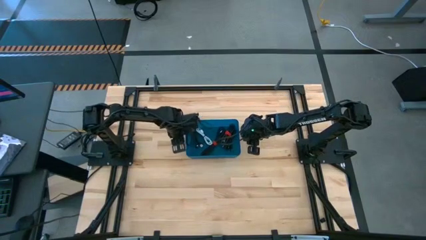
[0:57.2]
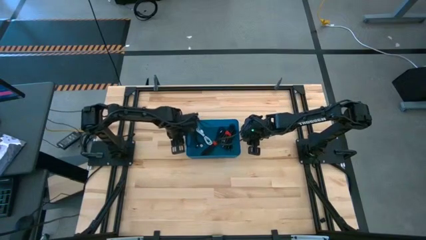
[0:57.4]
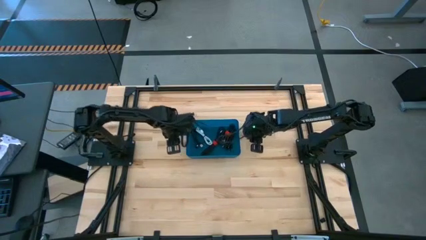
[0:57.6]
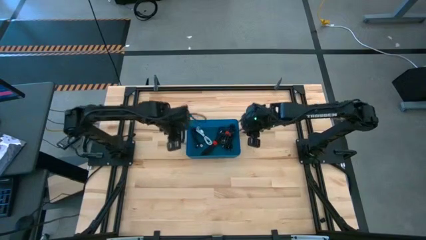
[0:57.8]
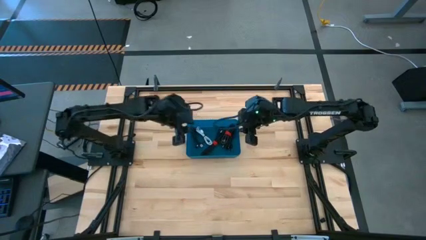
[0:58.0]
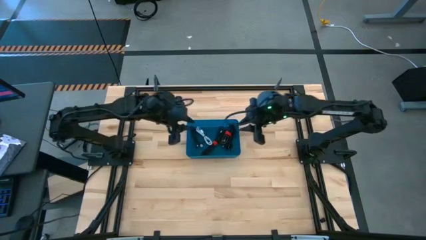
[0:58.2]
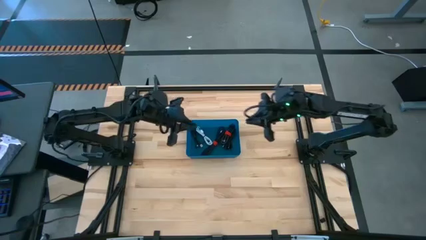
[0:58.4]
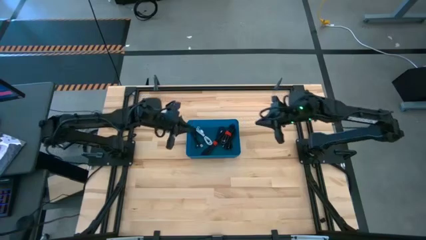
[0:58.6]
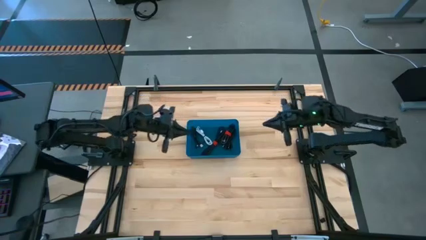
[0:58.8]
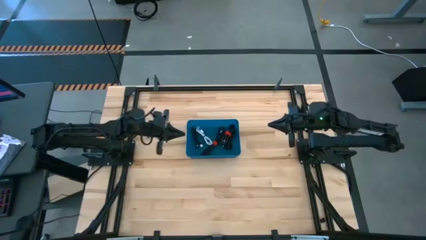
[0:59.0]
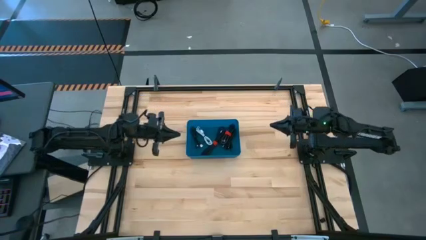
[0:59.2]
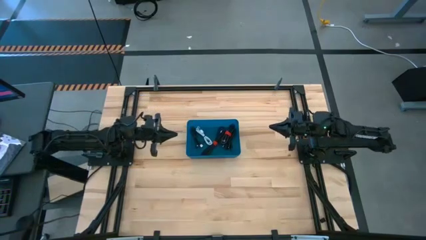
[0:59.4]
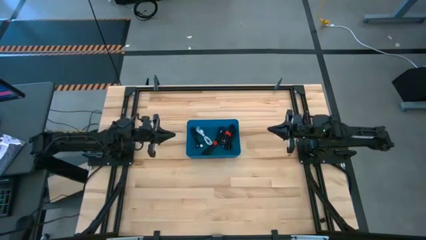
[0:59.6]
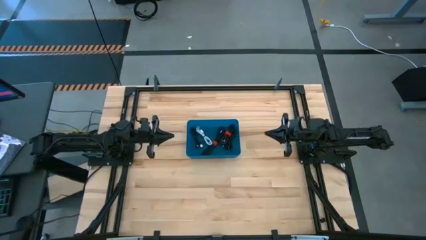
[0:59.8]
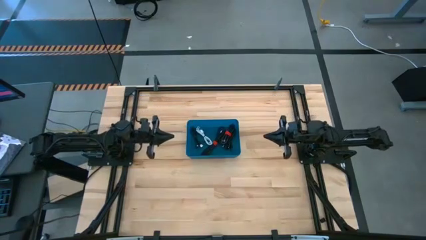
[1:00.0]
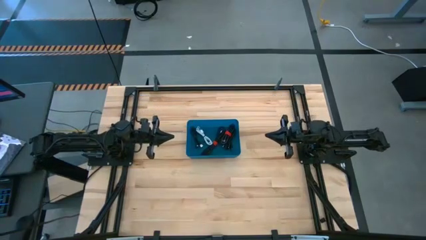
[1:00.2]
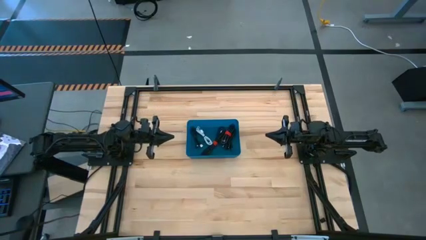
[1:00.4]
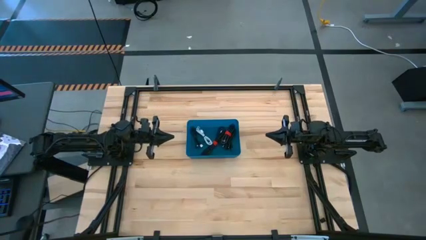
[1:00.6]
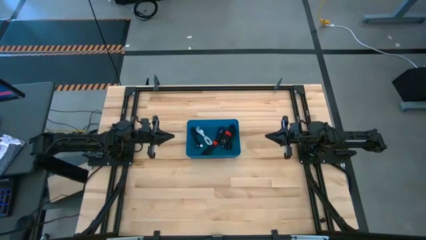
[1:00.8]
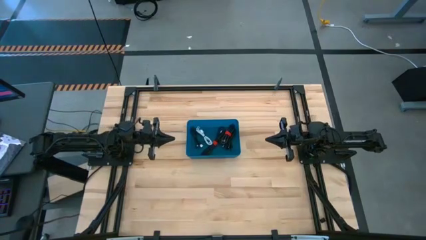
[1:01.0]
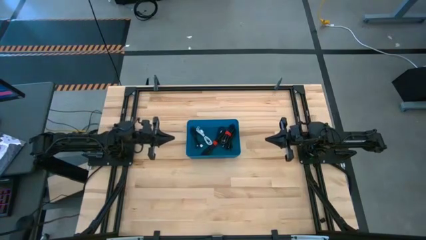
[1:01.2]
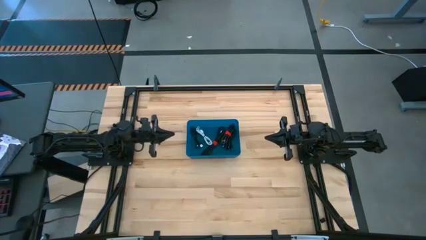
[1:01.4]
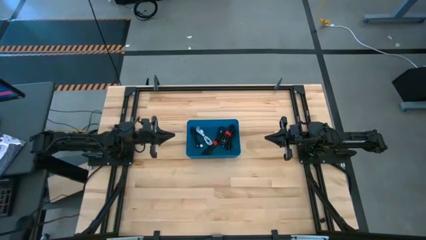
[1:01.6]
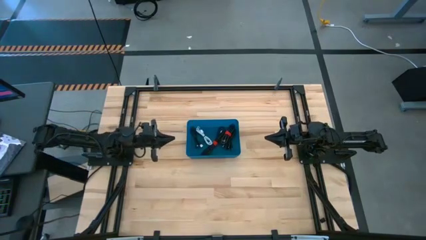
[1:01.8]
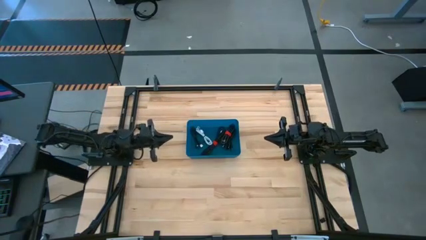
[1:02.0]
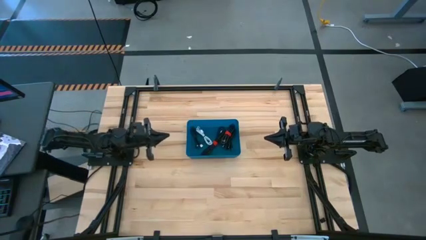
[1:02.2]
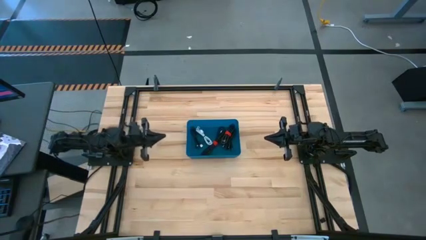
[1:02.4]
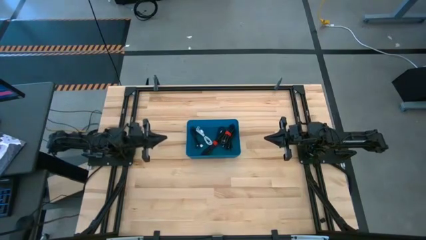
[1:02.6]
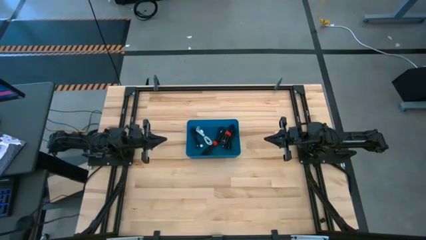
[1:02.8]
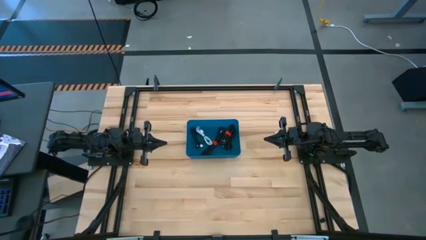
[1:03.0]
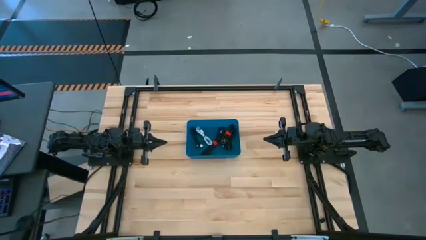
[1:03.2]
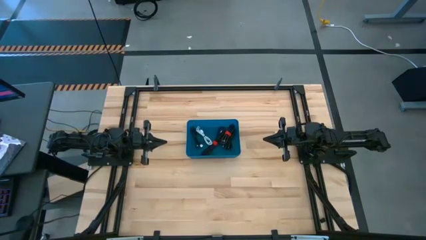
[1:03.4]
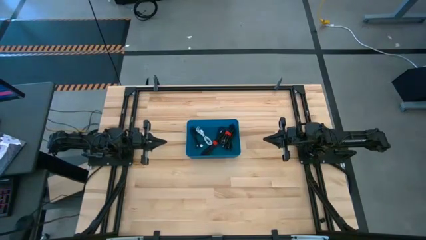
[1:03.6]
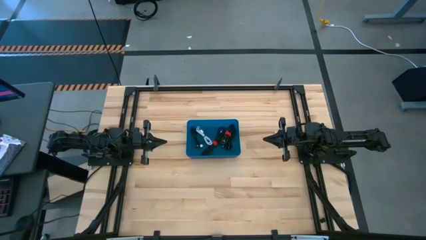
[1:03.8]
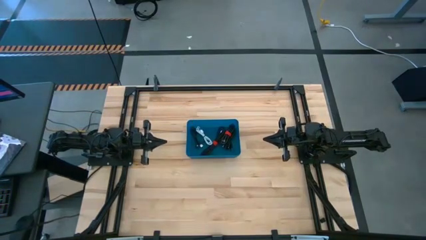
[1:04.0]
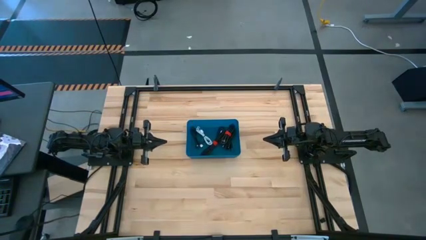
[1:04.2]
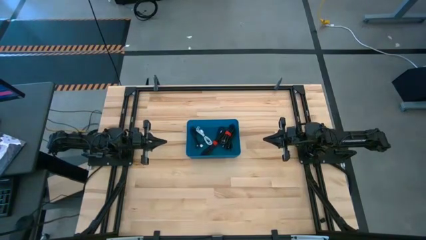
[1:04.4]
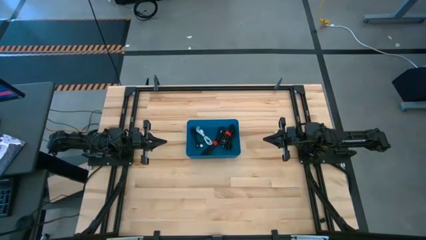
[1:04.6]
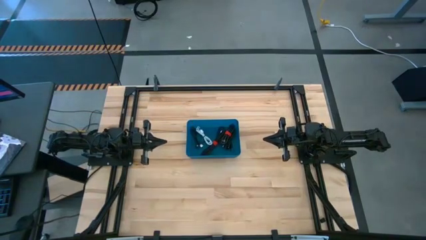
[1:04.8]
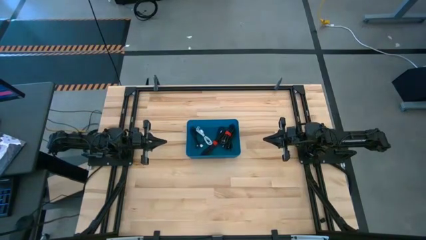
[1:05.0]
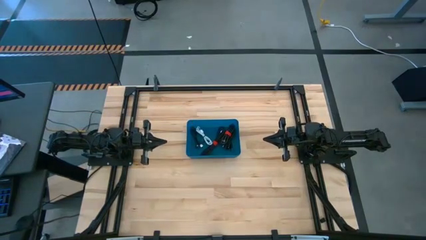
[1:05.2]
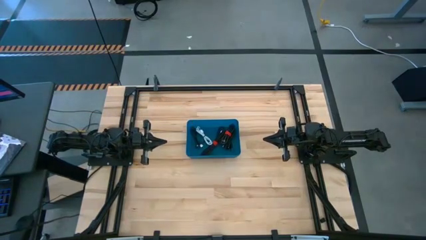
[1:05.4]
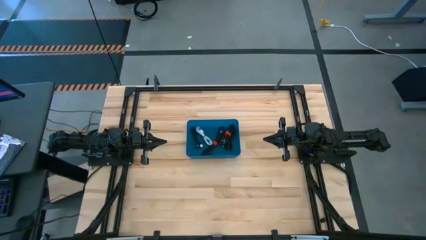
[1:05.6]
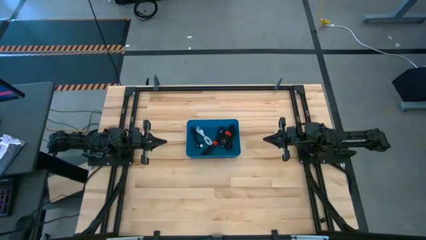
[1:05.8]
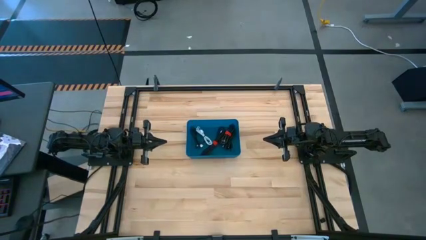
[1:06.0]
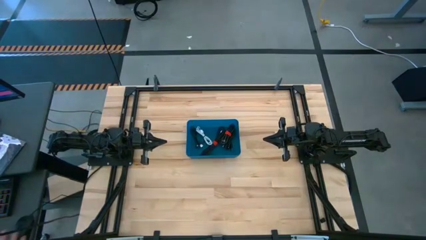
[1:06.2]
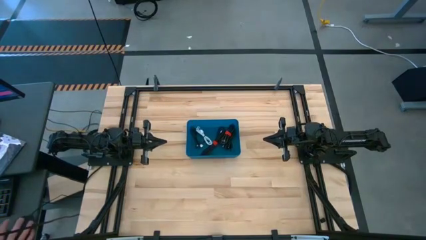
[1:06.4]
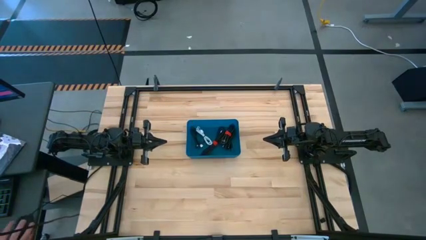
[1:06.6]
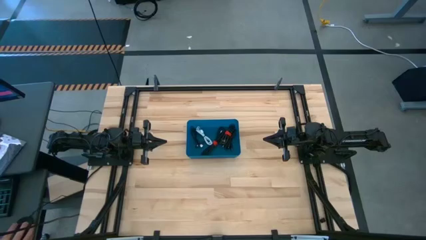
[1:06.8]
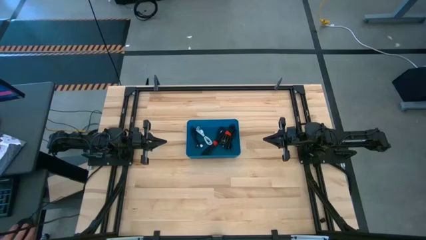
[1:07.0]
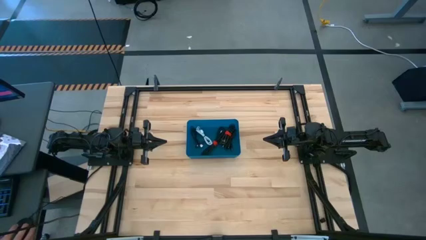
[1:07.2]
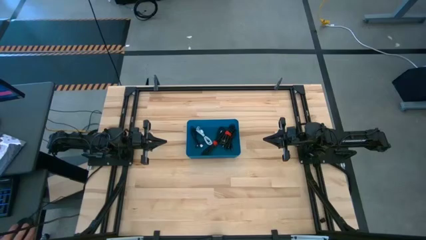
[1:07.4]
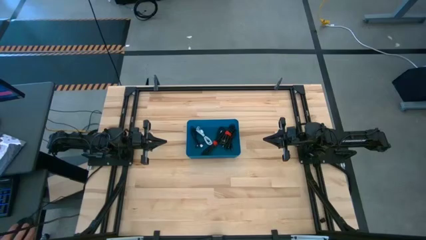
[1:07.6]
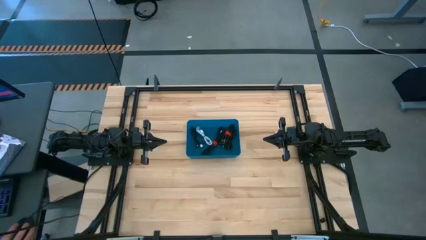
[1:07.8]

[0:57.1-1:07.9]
Task: Pick and place USB-C Cables
Return to Home Position

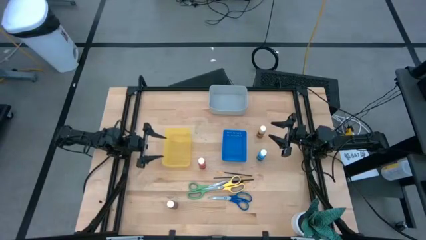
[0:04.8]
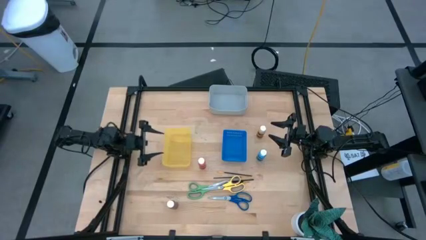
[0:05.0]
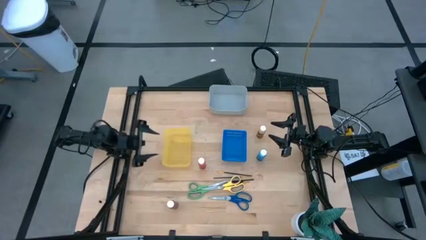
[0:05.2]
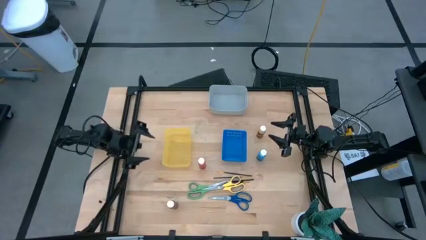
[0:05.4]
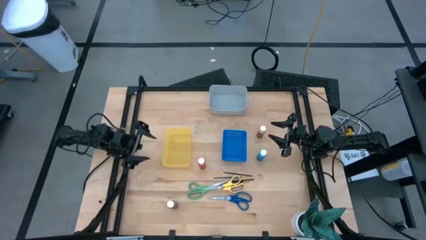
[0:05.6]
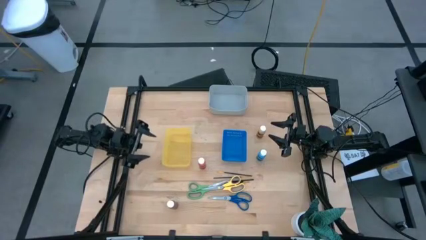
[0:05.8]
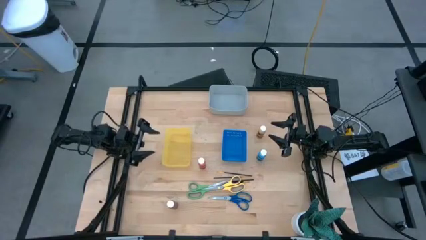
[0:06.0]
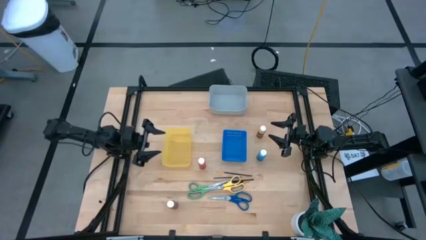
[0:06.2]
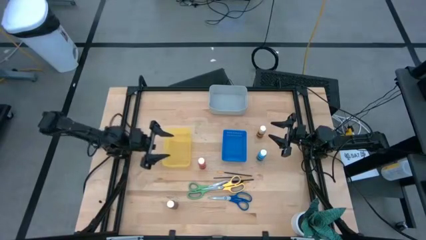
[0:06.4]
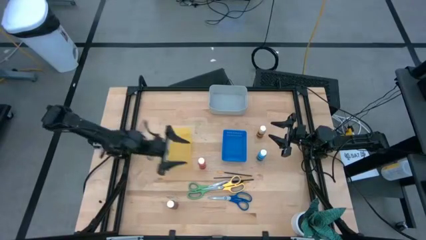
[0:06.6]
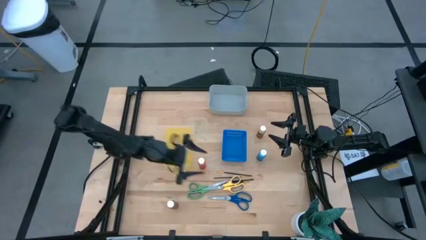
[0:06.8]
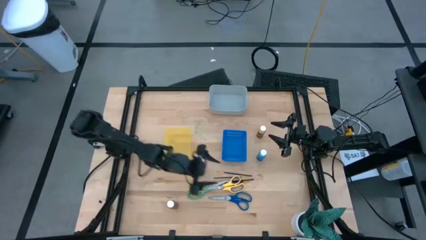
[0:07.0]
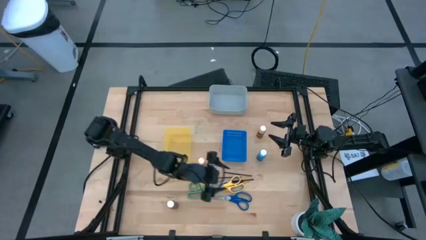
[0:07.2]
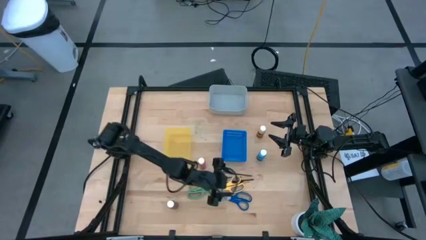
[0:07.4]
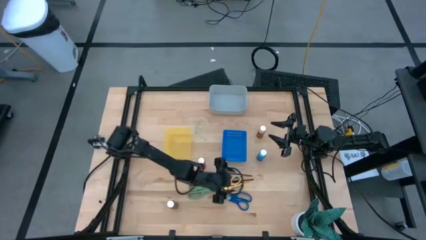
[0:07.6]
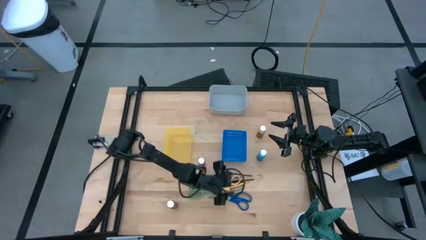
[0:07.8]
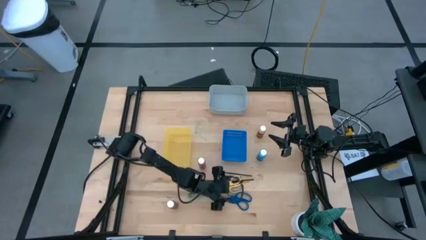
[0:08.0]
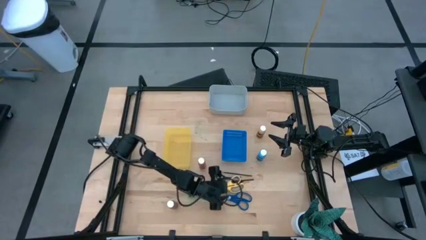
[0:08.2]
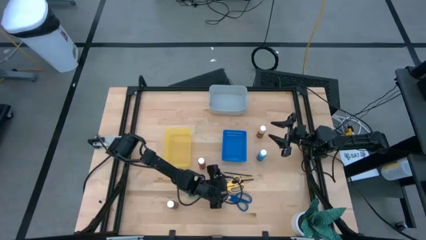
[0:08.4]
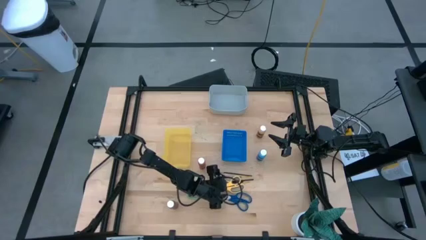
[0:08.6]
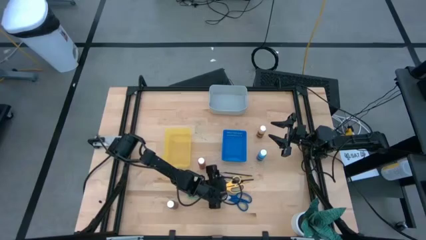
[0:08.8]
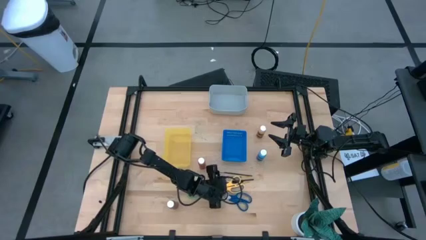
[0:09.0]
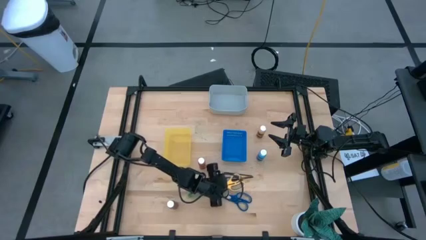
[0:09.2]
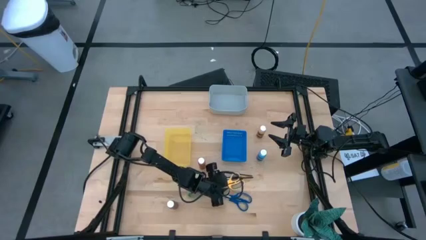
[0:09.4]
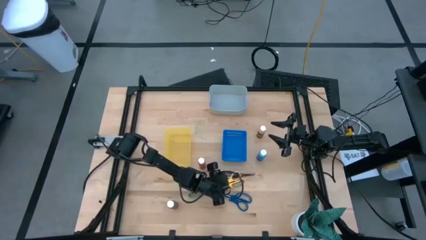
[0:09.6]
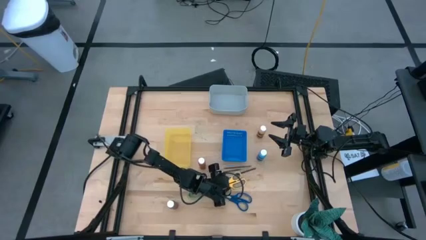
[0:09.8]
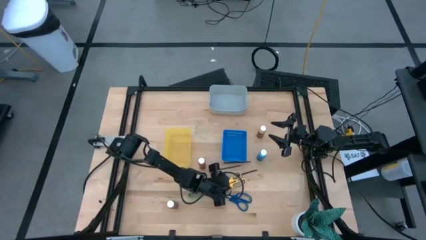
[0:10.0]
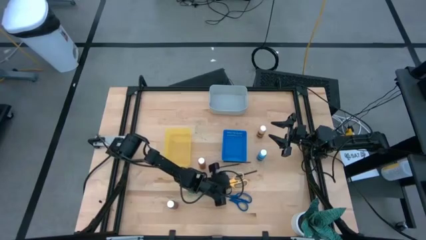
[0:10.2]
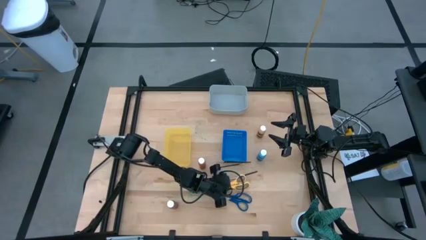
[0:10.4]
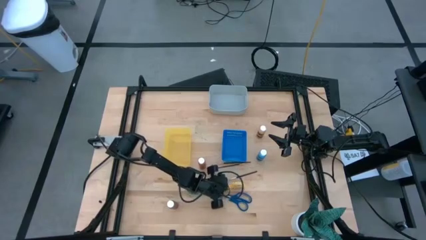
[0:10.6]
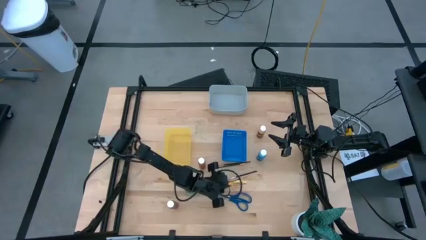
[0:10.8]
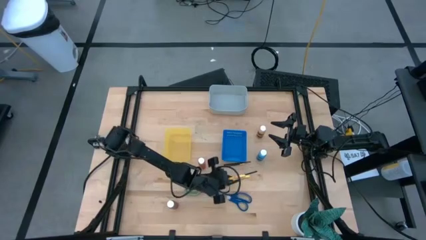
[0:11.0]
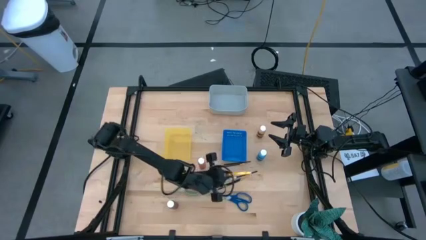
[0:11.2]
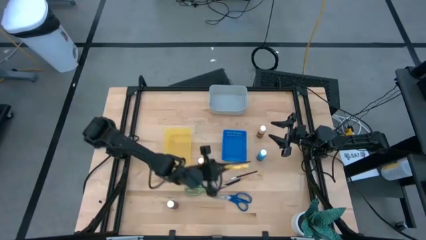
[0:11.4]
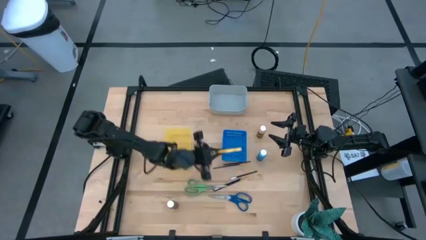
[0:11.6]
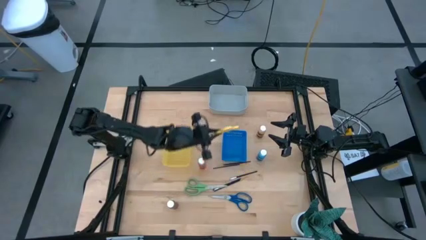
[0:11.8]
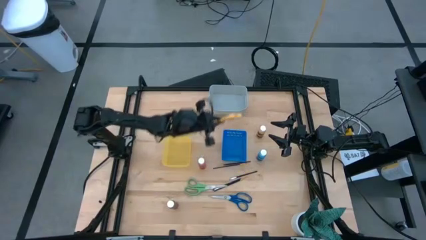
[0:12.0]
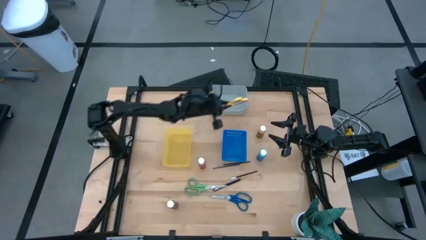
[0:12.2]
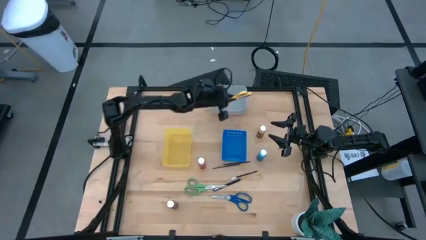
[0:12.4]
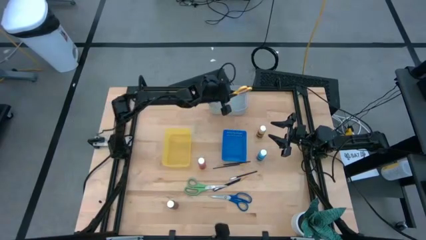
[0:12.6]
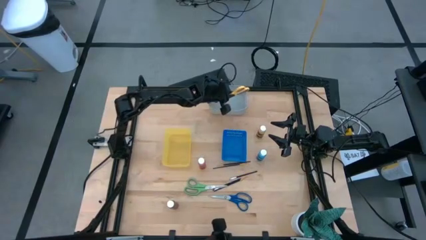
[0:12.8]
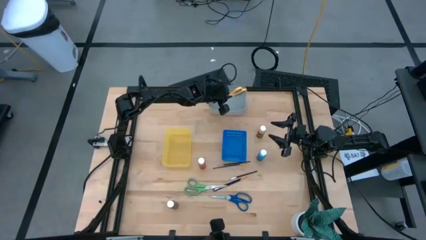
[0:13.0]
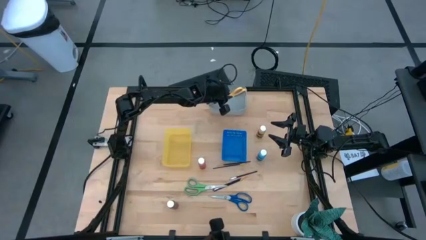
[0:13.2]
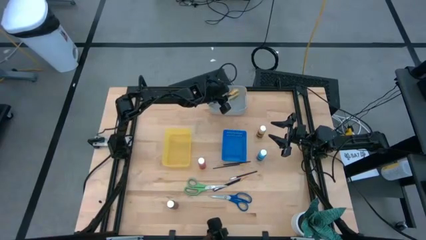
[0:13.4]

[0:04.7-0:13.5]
Task: Pick & Place Paint Supplies
Put the yellow scissors into the gray bin
